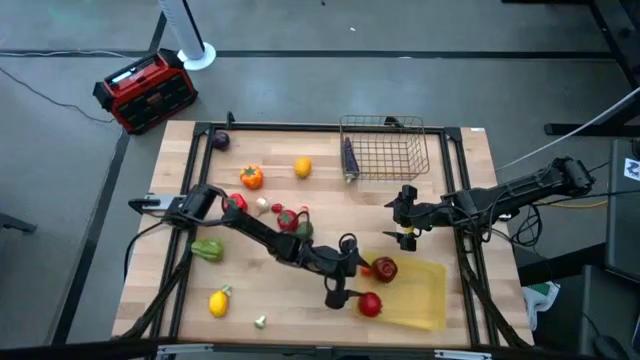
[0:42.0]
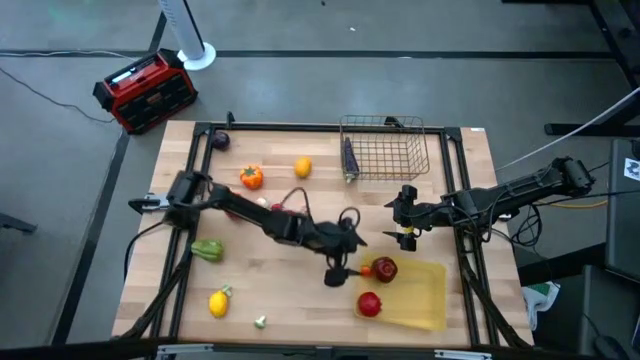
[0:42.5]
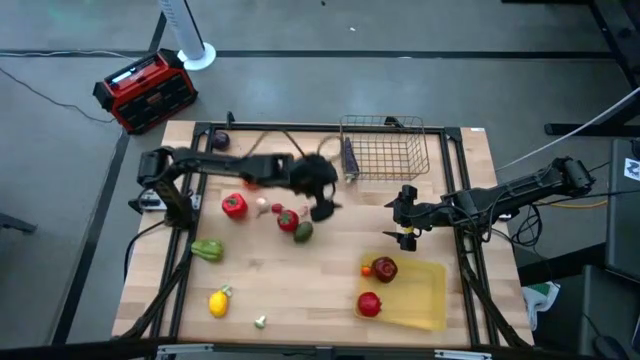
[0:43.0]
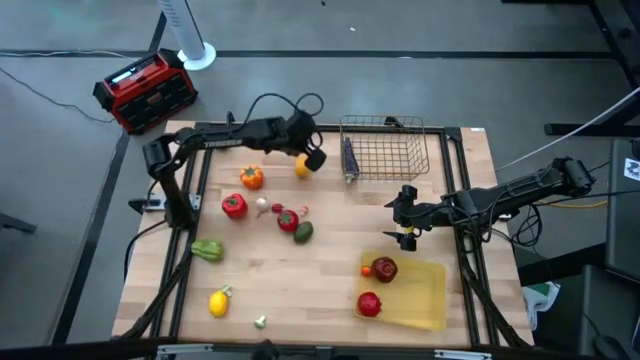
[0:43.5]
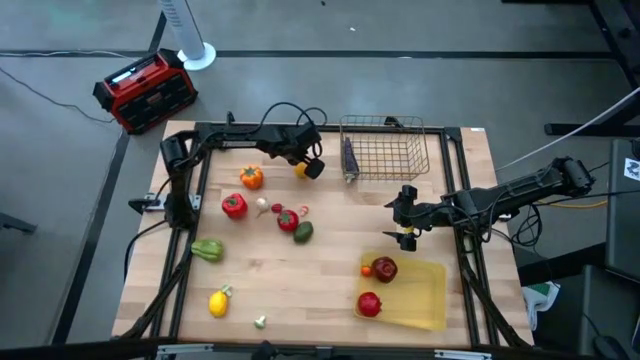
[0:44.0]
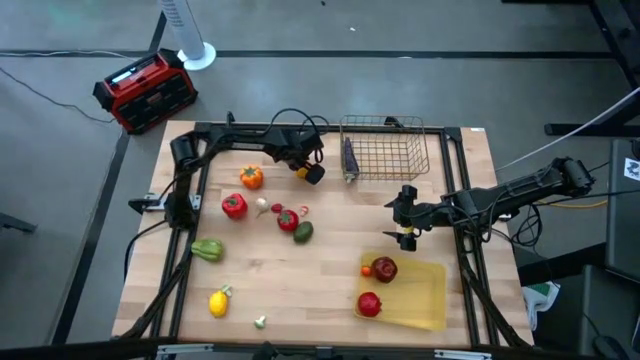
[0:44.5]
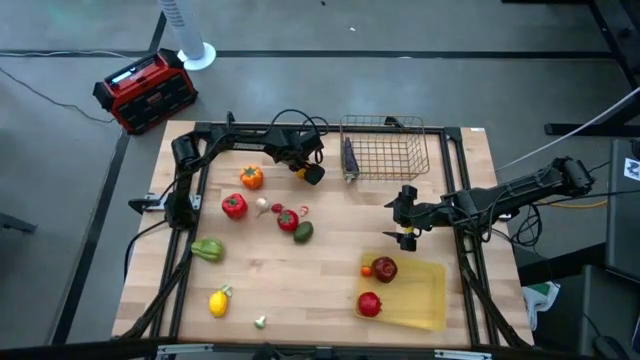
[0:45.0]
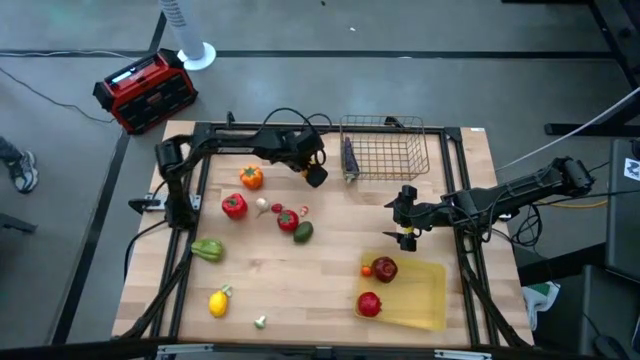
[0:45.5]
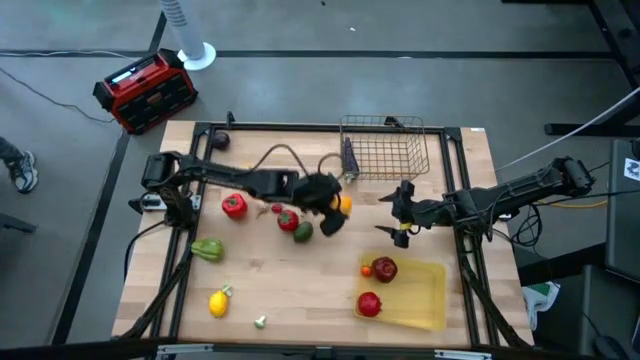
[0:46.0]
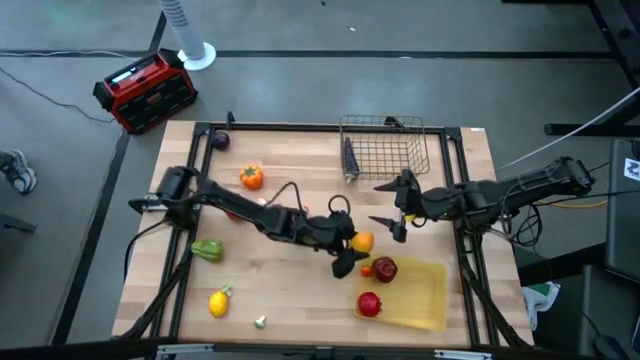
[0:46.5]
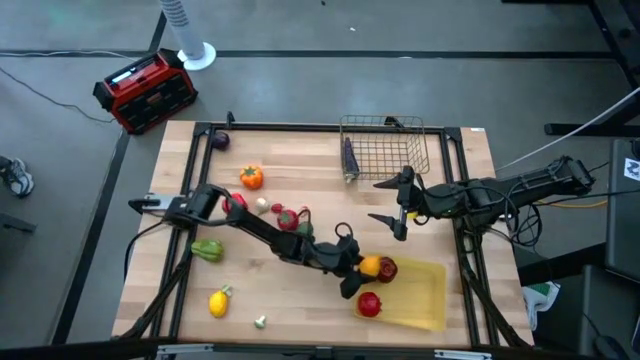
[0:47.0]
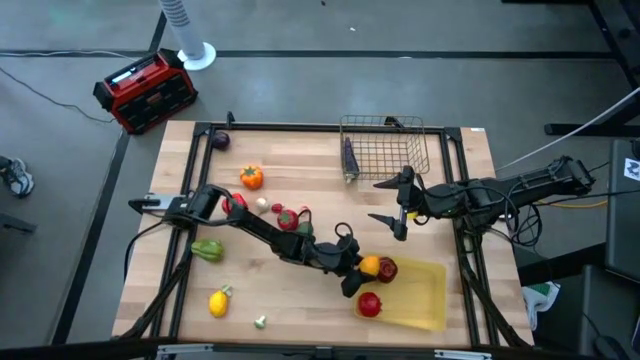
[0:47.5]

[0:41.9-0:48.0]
Task: Sort produce into baskets
Put the top lemon into the yellow bin

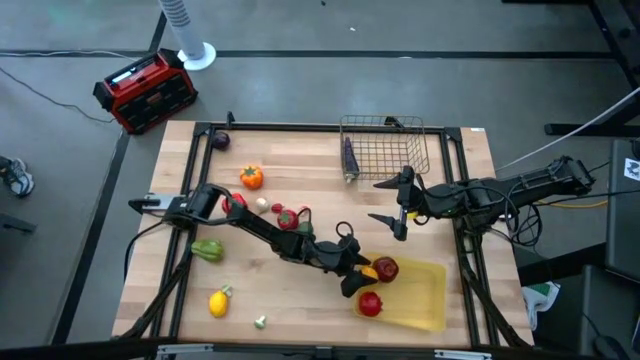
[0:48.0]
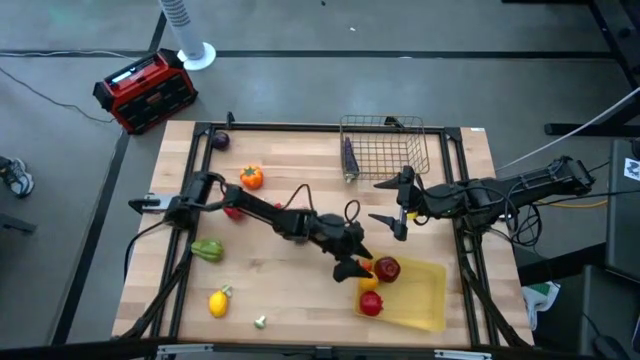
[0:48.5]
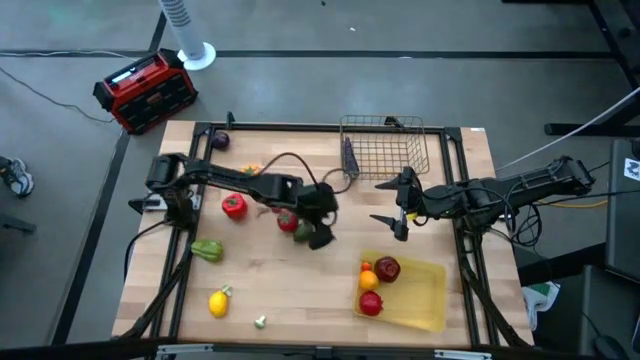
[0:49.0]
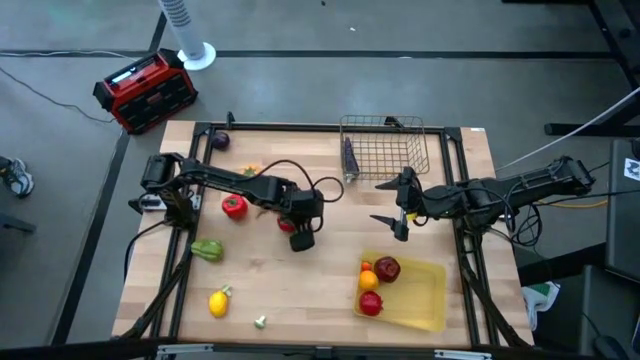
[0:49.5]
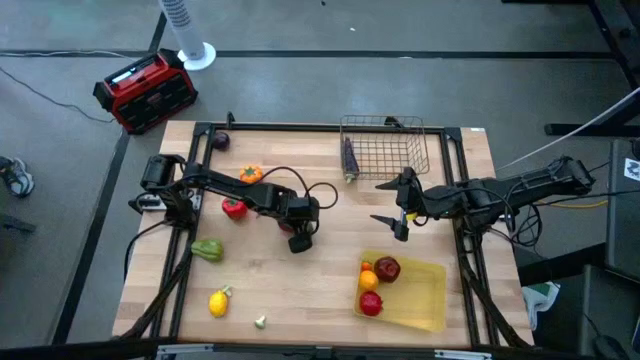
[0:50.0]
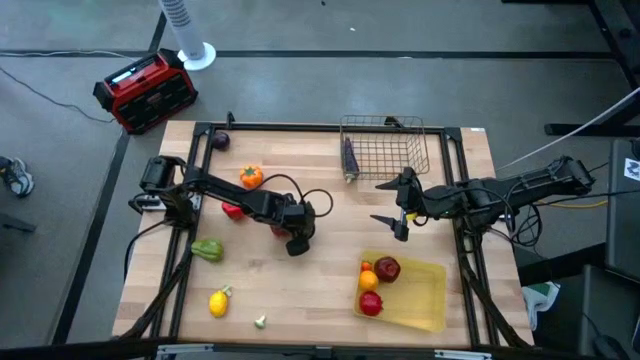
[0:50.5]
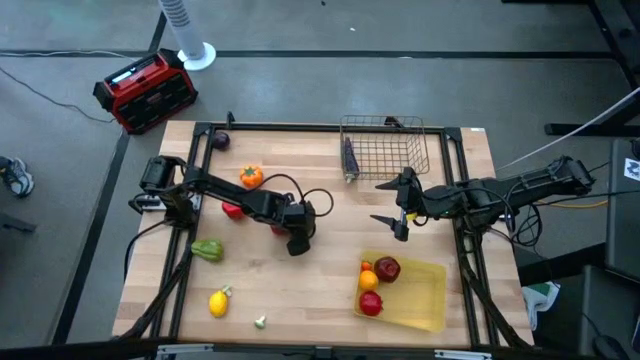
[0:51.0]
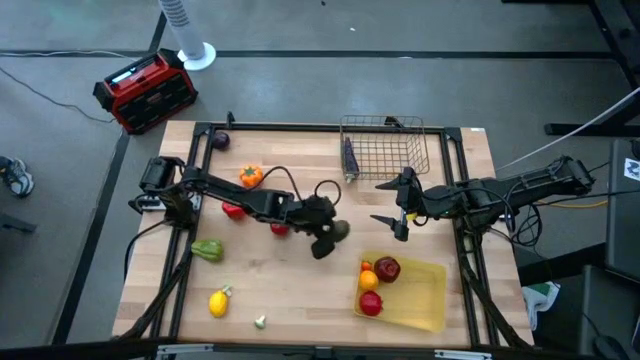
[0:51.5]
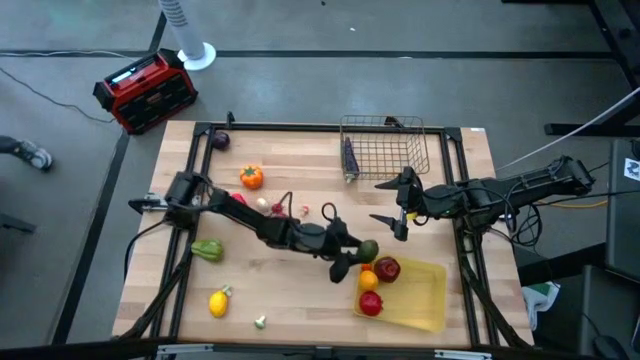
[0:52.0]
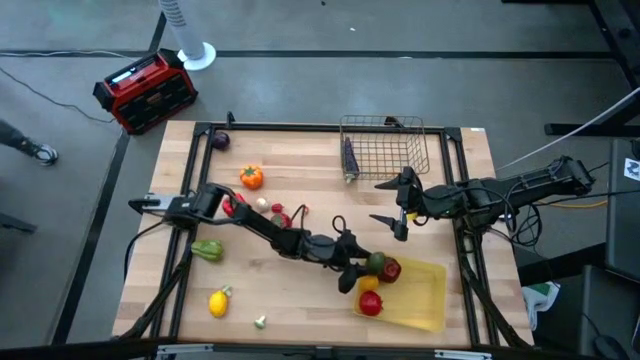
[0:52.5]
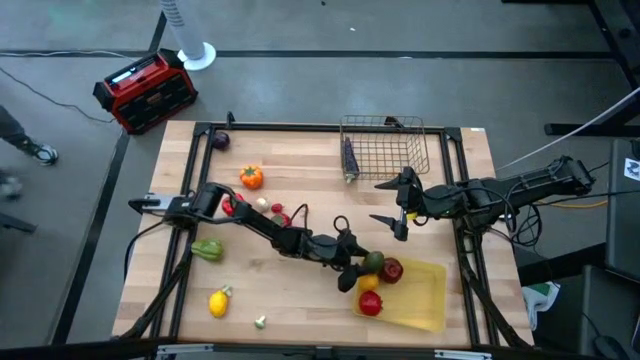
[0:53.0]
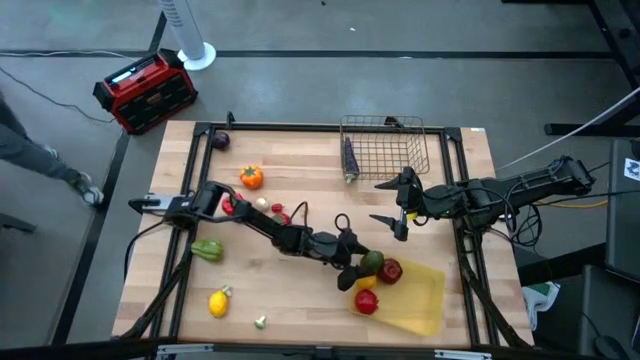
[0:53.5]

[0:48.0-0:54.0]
Put the lime into the yellow bin

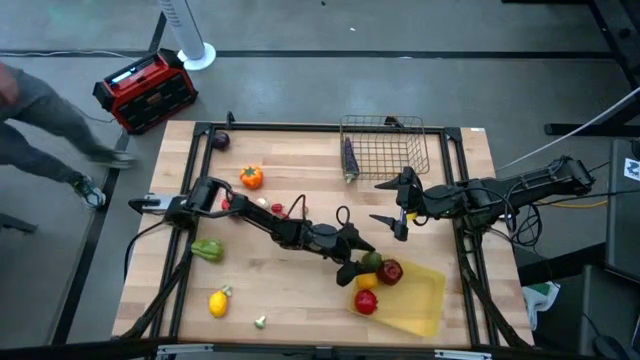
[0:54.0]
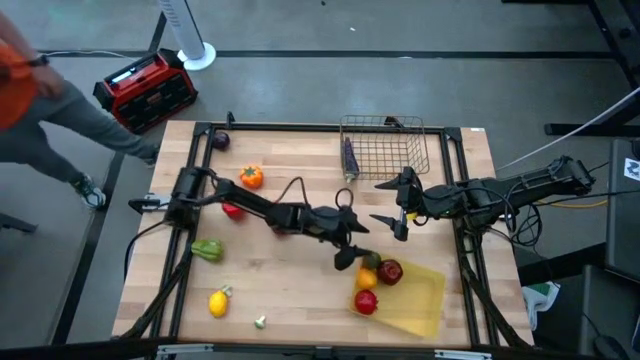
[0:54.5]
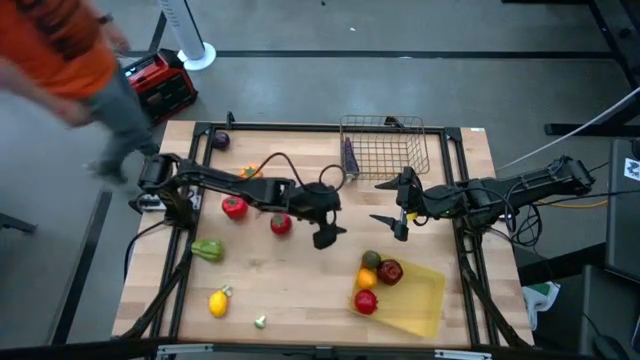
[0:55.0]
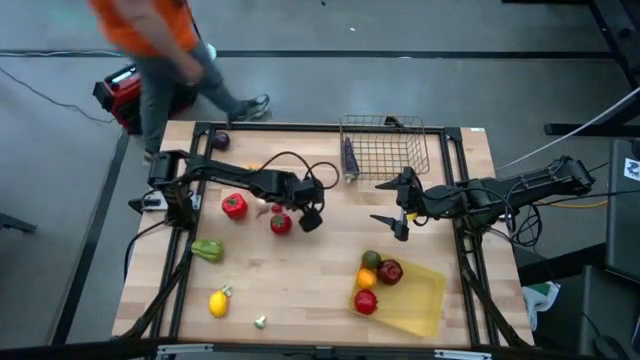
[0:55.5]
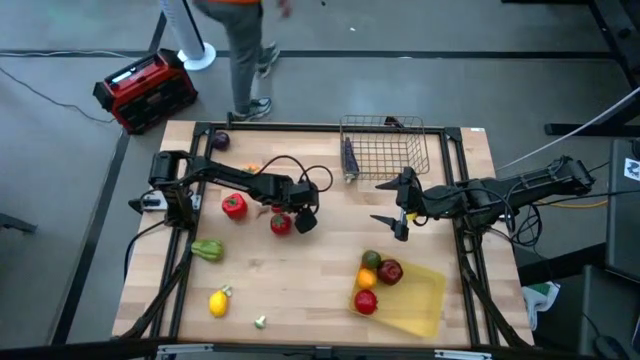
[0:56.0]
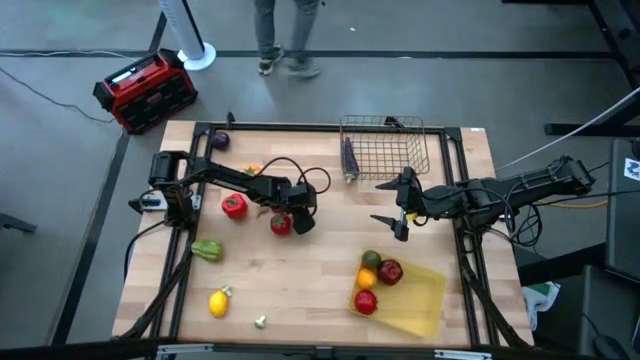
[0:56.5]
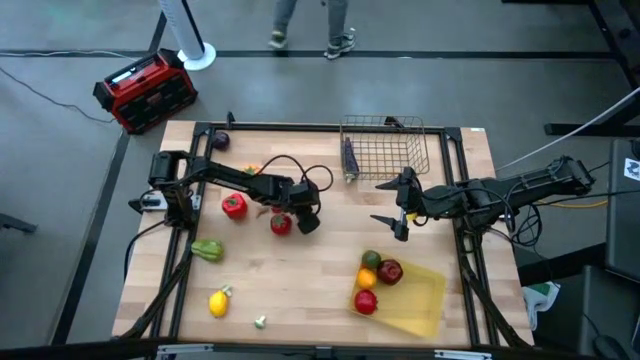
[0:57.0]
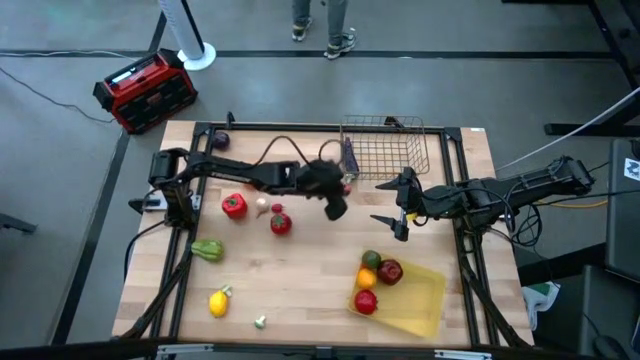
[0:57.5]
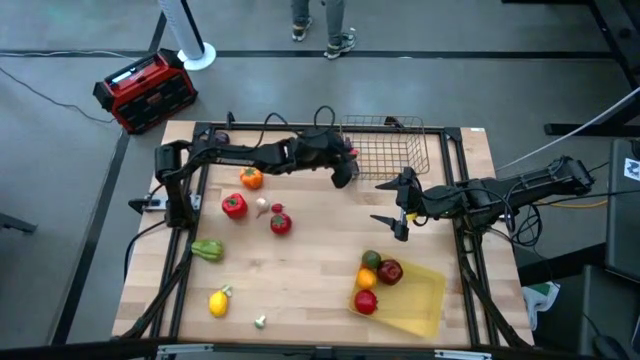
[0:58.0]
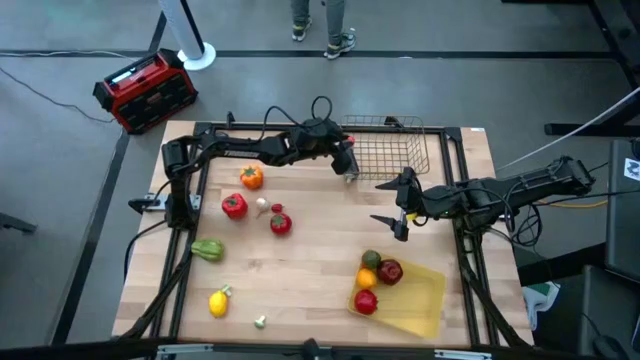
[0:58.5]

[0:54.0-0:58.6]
Put the red mushroom into the wire basket

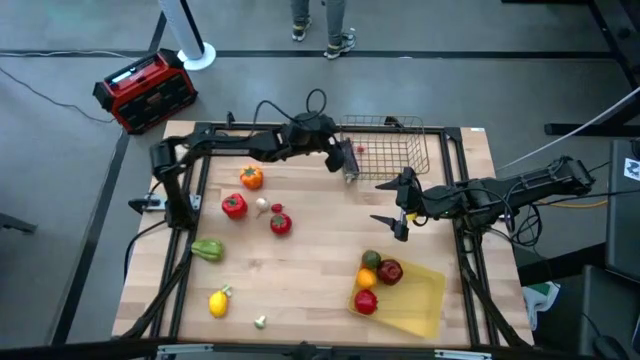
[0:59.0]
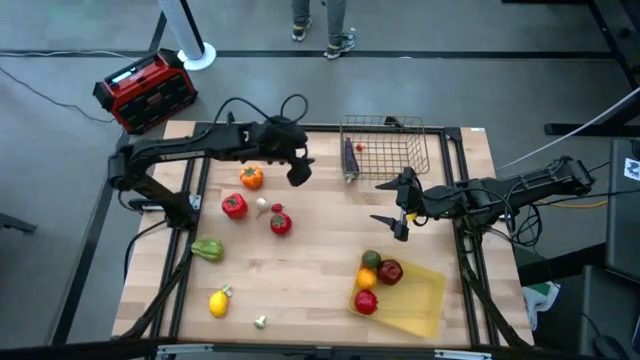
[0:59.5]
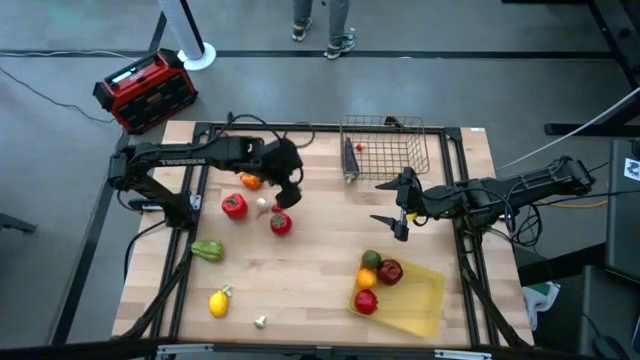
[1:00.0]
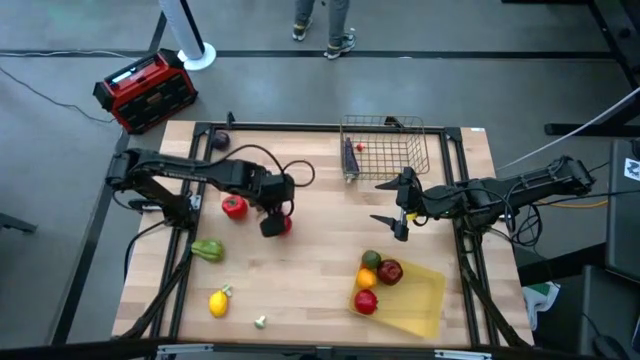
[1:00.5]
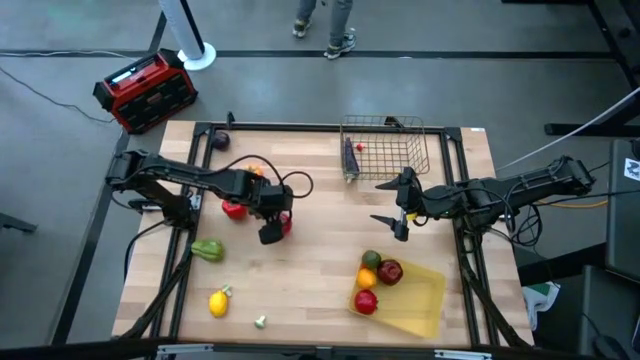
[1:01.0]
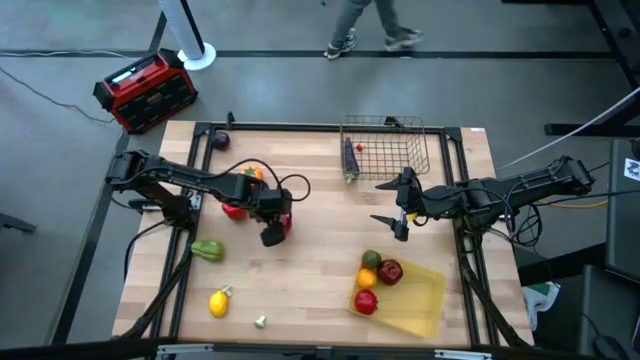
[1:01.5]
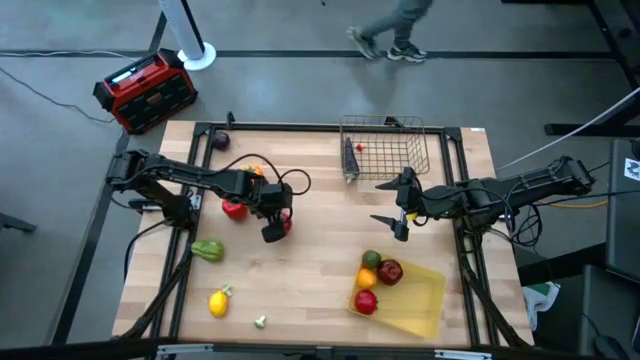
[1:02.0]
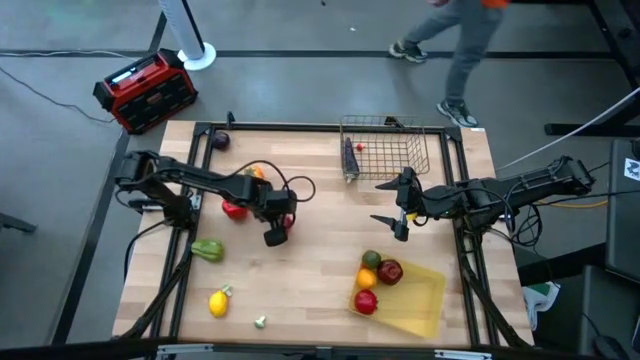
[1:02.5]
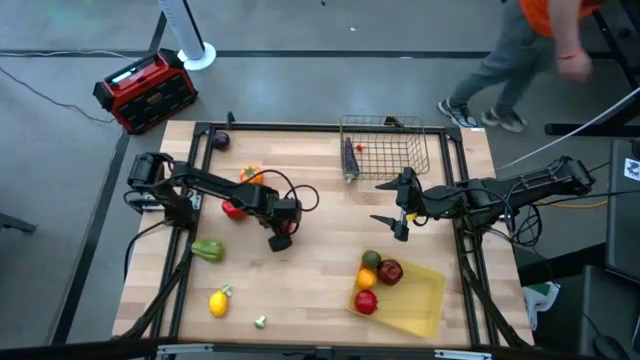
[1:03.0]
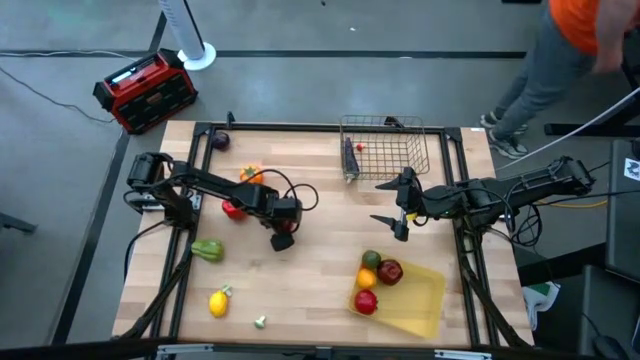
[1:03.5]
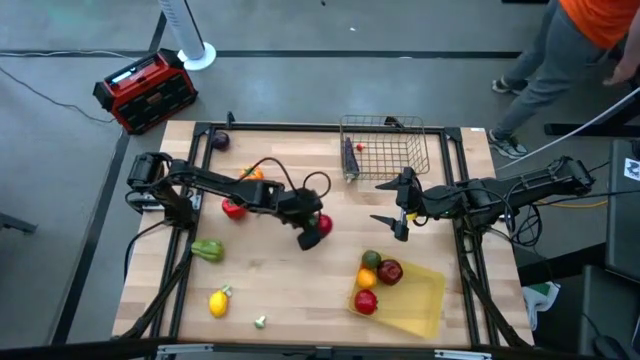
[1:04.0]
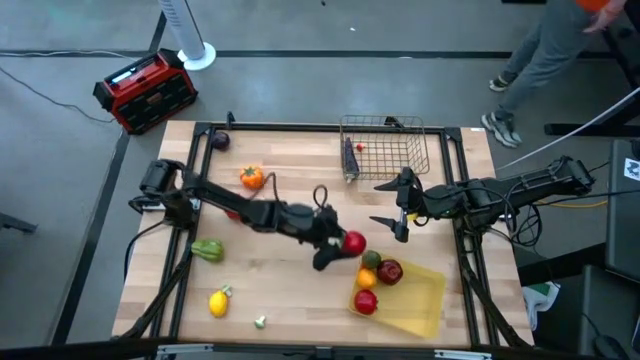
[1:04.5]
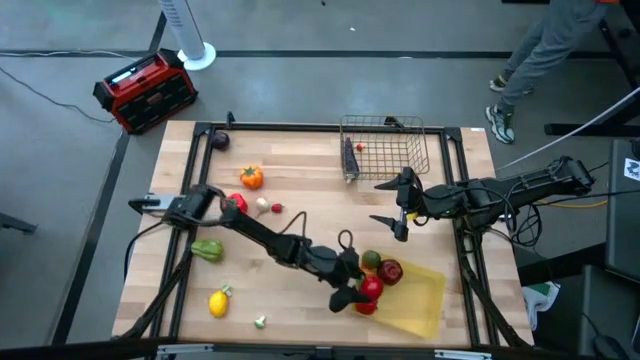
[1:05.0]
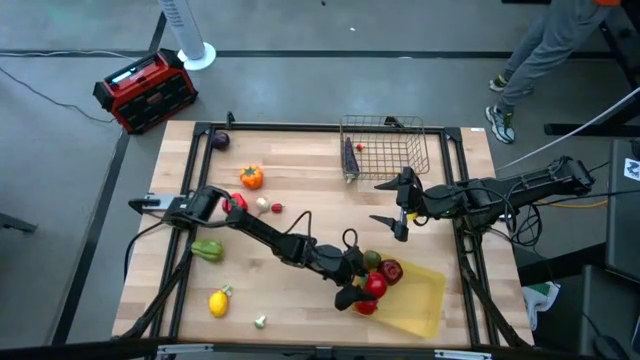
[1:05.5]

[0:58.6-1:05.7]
Put the red tomato into the yellow bin
